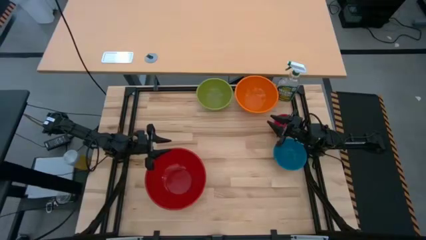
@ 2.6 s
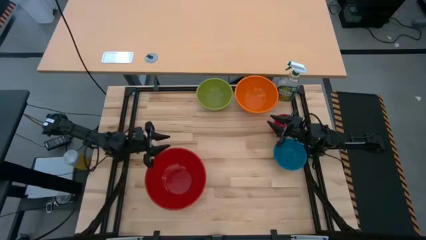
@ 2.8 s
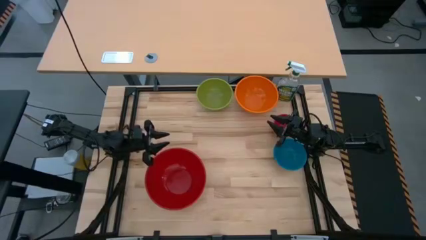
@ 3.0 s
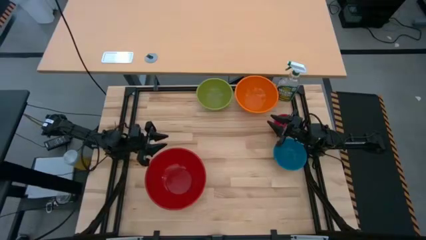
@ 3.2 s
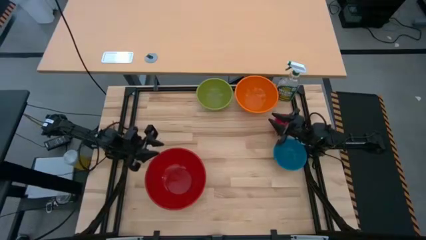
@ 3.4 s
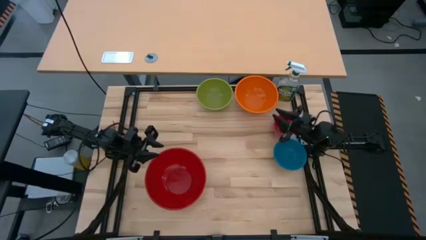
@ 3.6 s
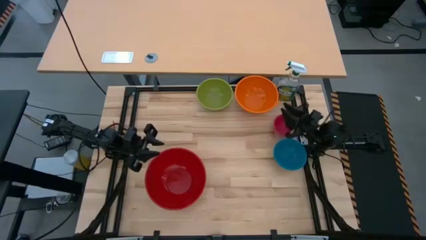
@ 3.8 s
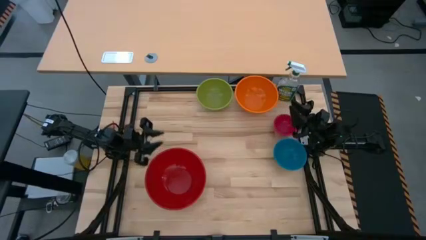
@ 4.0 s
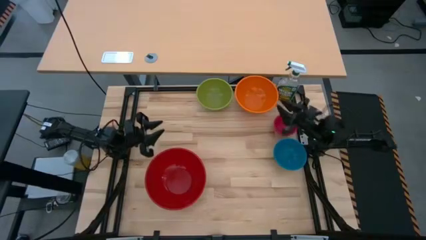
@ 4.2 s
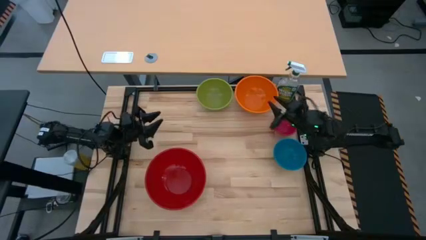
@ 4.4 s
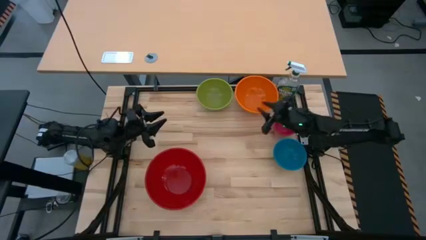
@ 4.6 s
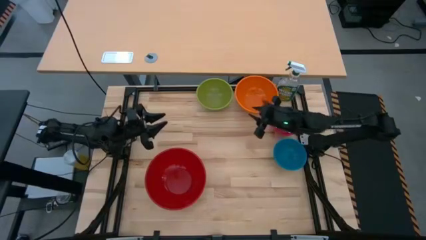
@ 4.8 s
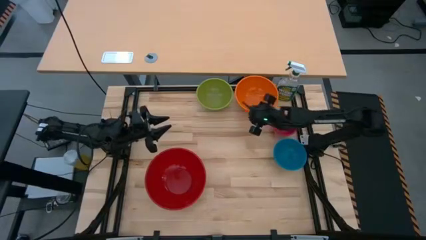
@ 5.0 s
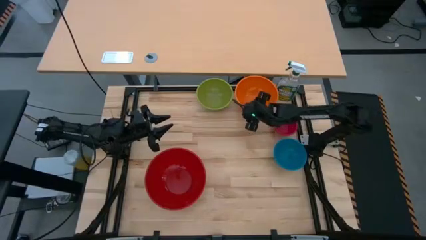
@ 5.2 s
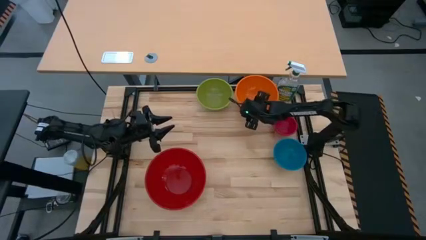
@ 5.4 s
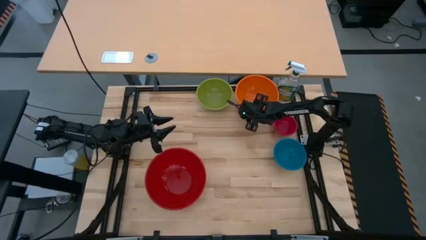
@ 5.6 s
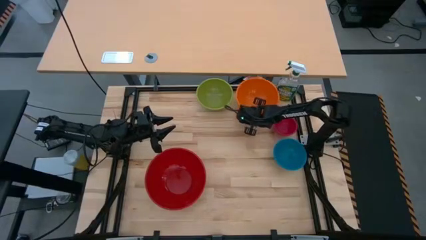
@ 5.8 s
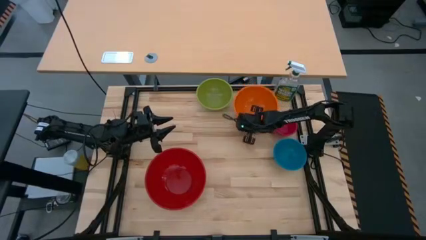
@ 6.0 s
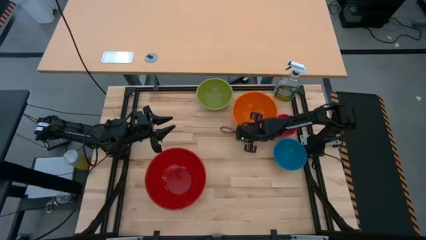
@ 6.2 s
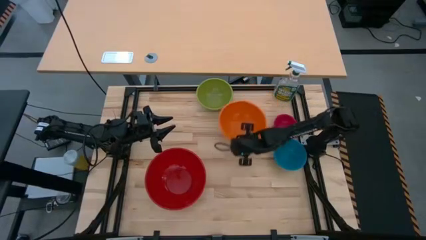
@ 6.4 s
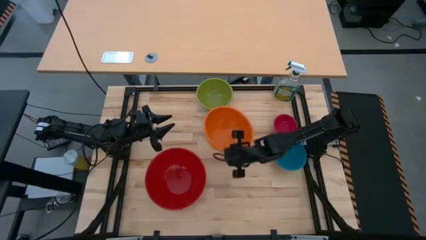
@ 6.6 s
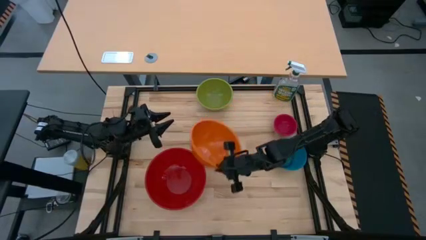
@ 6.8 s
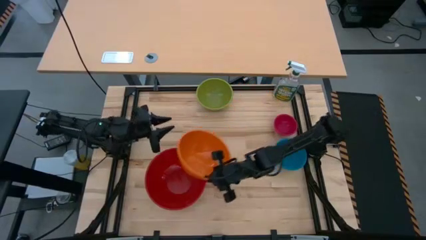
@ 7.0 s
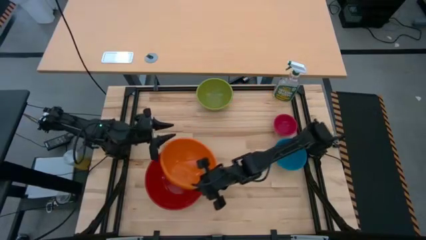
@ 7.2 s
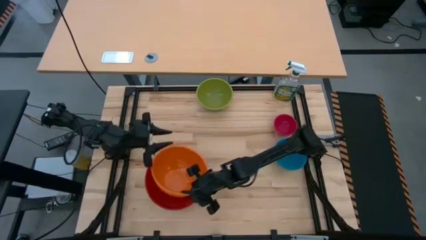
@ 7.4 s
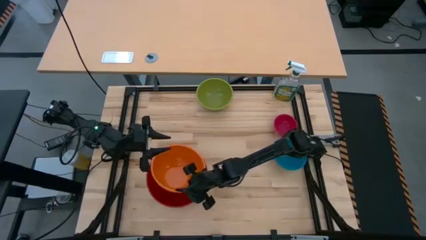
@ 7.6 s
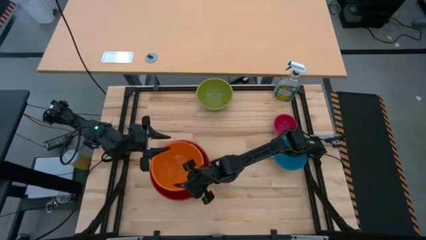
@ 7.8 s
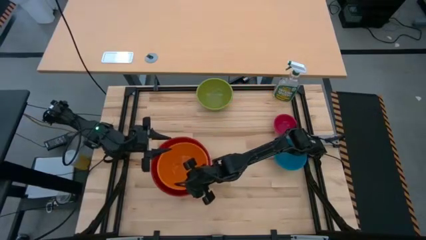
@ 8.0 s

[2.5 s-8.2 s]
Stack the orange bowl onto the large red bowl

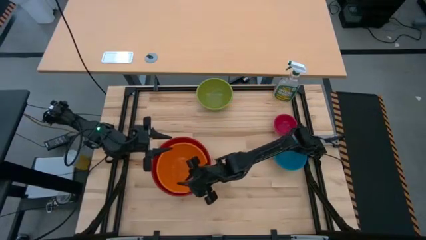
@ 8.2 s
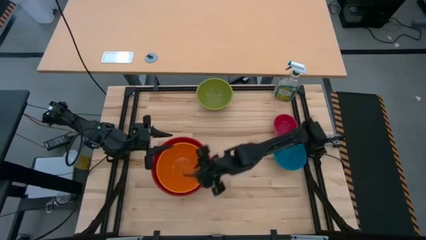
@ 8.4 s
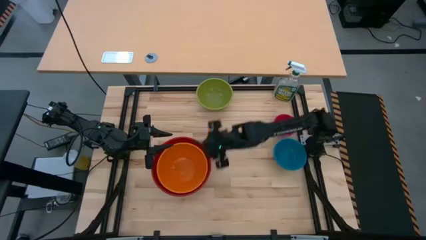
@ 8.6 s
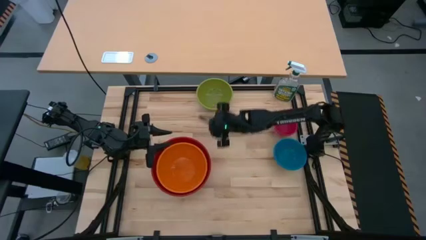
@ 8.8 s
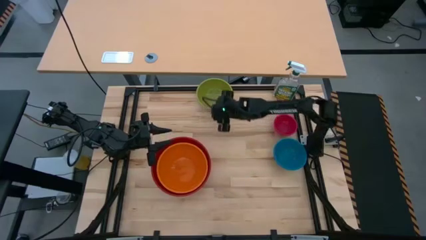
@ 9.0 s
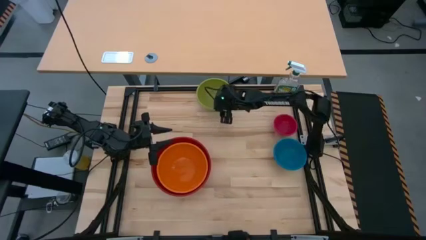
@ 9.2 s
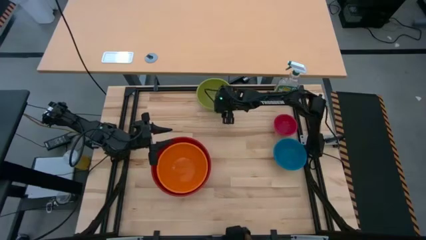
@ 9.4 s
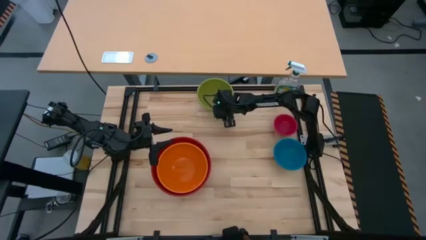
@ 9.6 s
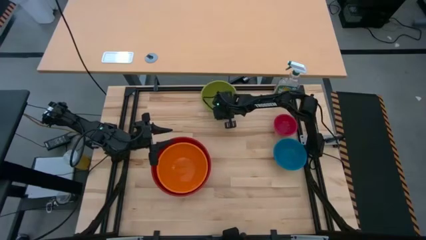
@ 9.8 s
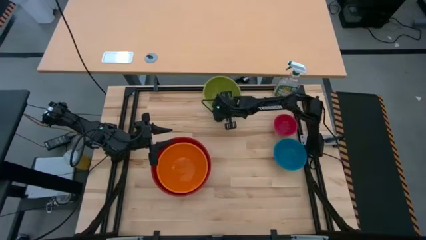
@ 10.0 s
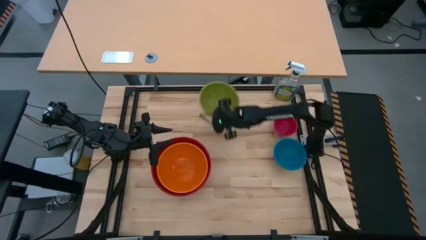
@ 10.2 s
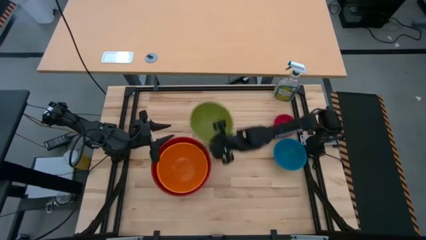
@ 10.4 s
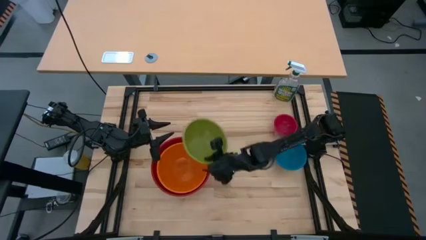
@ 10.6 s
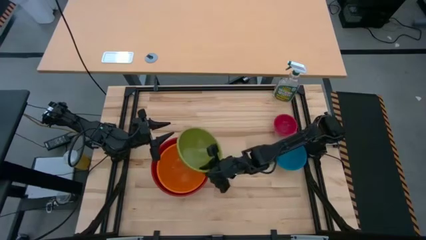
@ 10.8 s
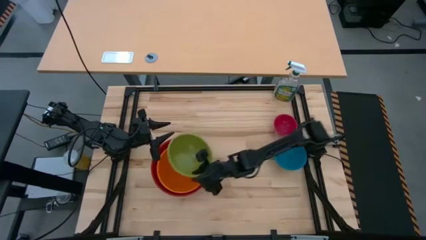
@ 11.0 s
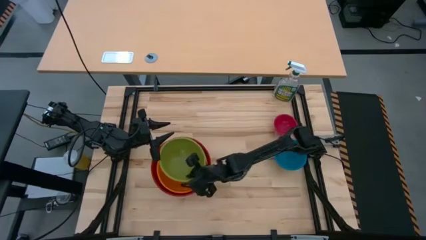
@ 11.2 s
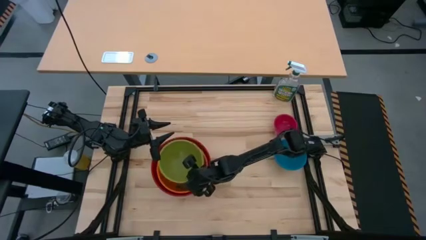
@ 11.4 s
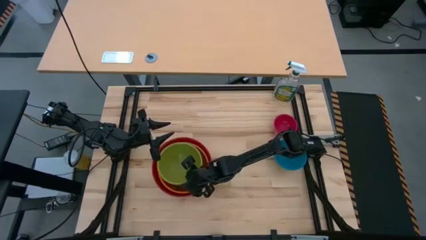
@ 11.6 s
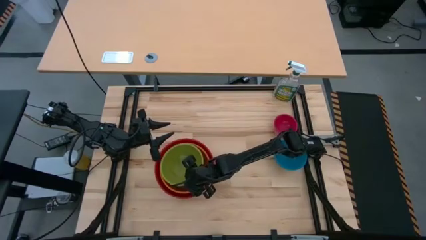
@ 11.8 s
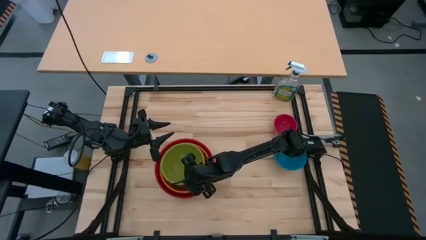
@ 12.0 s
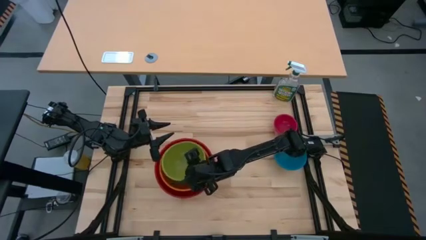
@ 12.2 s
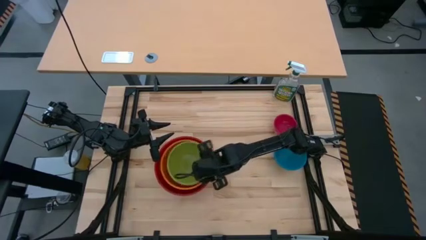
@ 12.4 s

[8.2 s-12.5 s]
Stack the green bowl onto the orange bowl

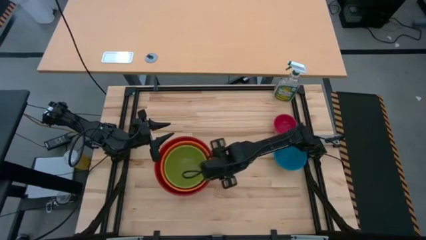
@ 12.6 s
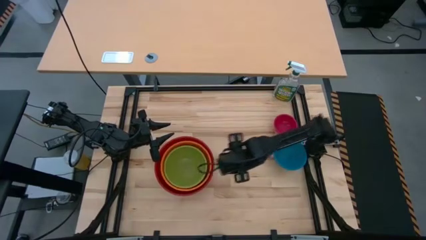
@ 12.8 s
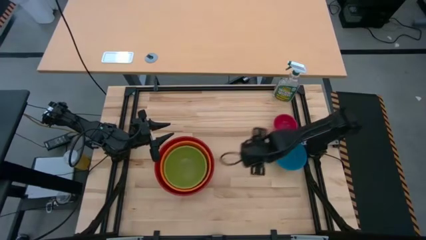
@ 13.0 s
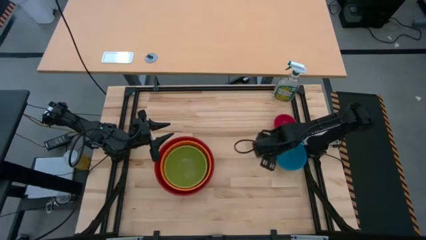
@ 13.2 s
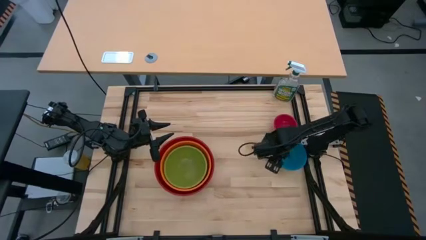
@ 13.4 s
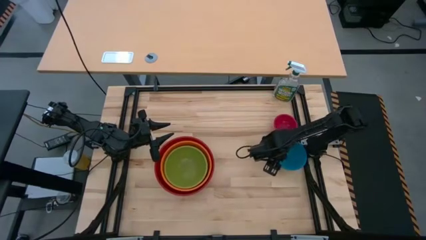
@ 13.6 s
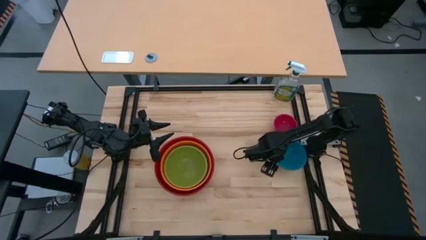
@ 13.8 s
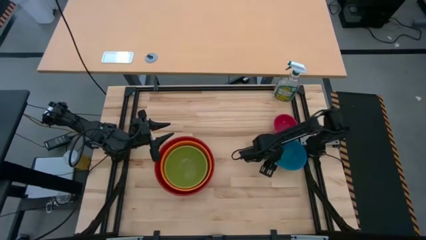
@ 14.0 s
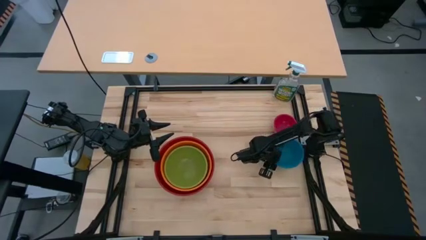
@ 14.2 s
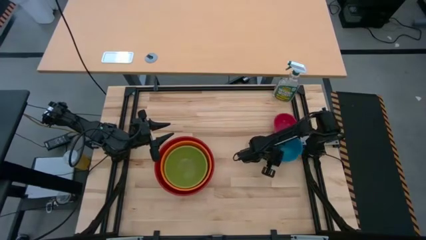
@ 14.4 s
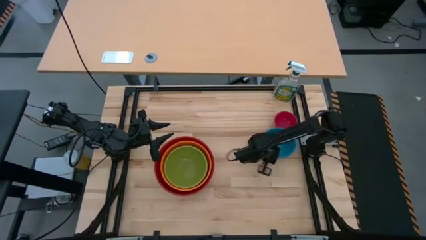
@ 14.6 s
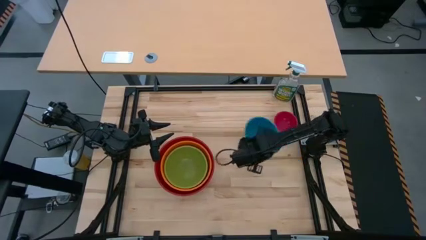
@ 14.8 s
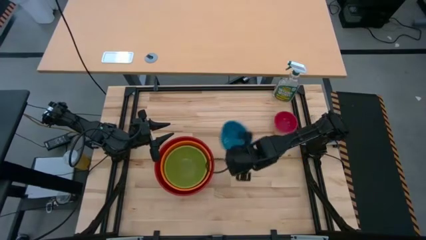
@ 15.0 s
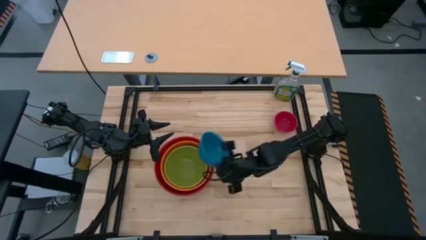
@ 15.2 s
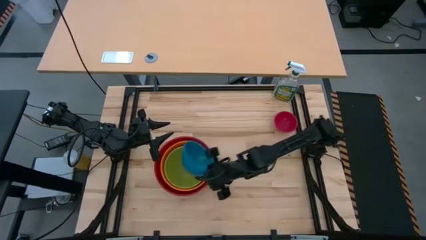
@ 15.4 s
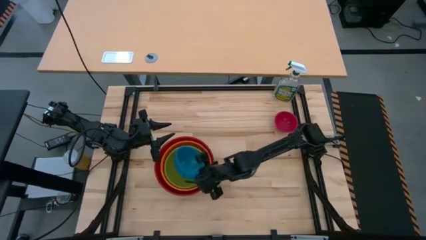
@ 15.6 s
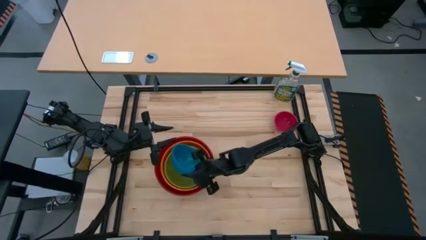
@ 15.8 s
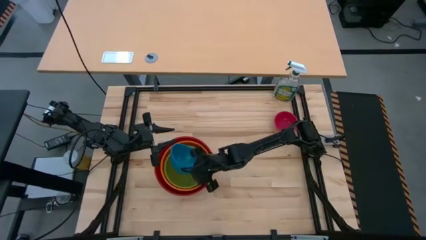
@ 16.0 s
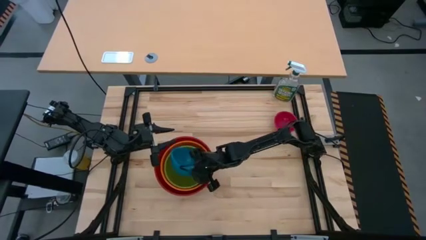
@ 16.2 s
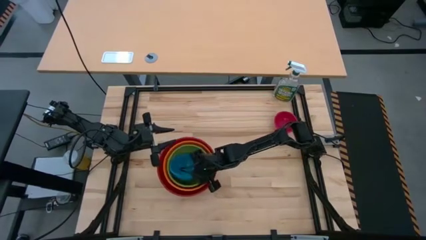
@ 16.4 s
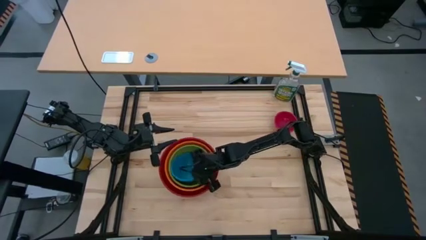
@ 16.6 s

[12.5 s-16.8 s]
Stack the blue bowl onto the green bowl
